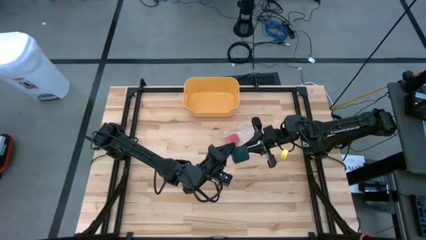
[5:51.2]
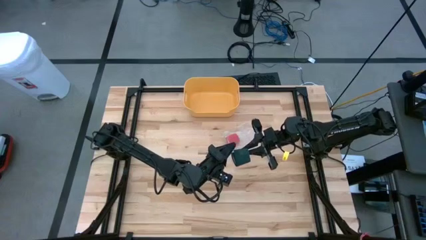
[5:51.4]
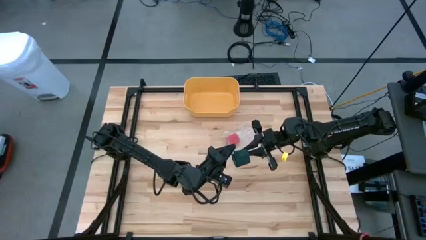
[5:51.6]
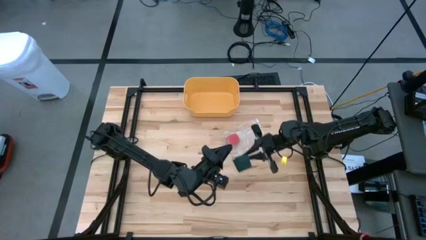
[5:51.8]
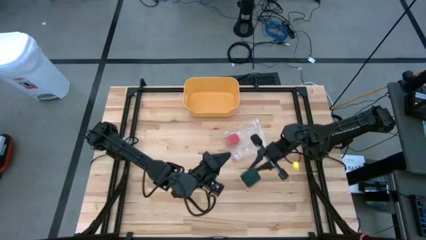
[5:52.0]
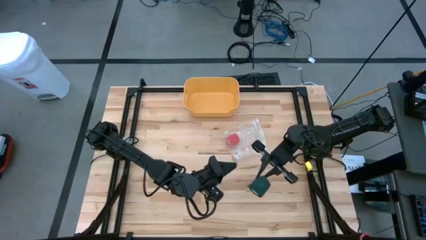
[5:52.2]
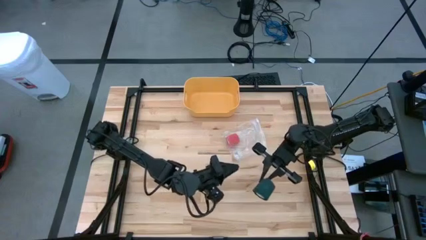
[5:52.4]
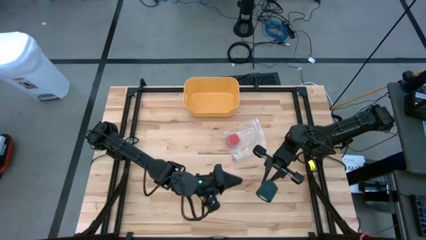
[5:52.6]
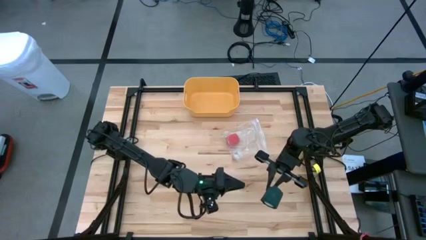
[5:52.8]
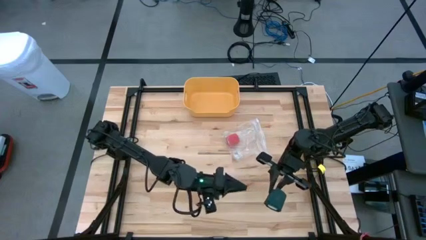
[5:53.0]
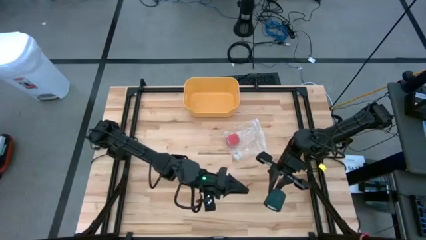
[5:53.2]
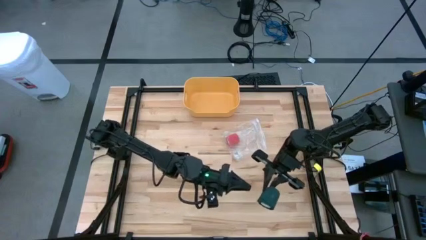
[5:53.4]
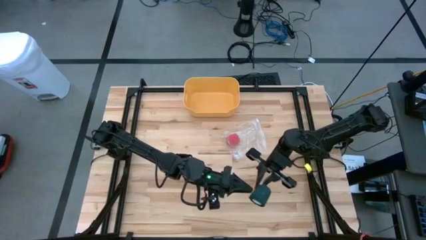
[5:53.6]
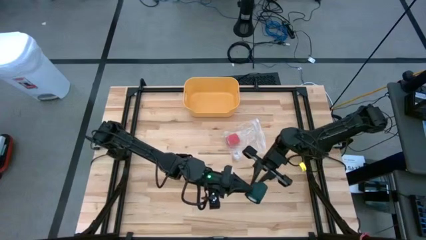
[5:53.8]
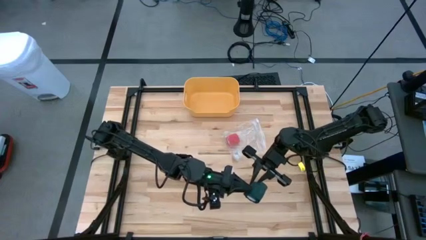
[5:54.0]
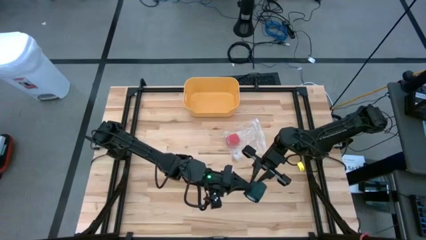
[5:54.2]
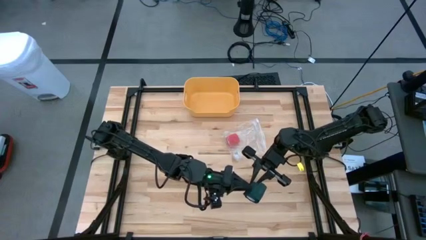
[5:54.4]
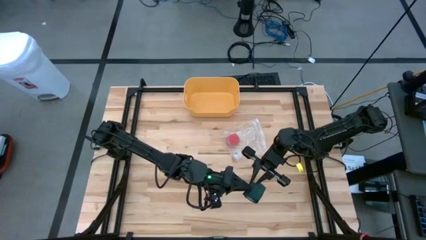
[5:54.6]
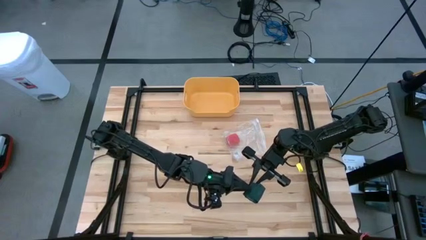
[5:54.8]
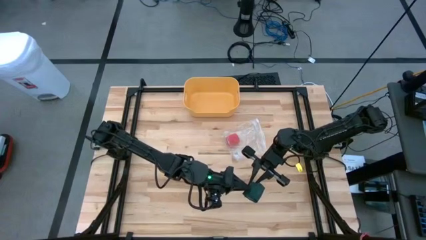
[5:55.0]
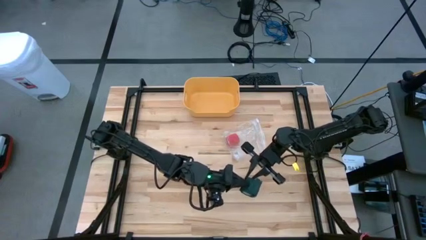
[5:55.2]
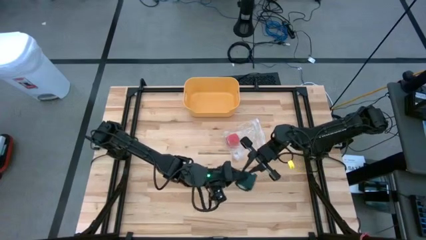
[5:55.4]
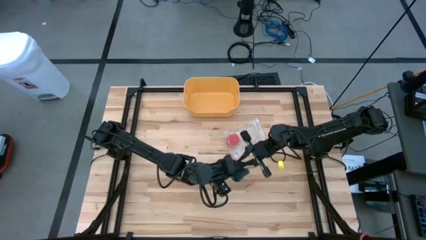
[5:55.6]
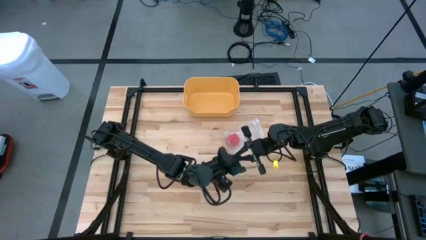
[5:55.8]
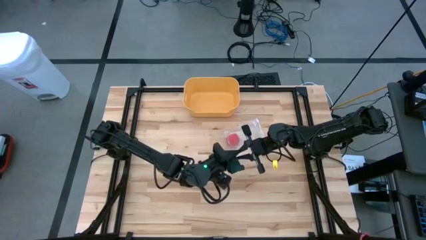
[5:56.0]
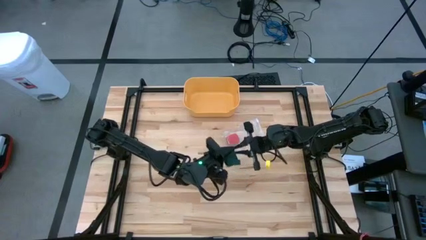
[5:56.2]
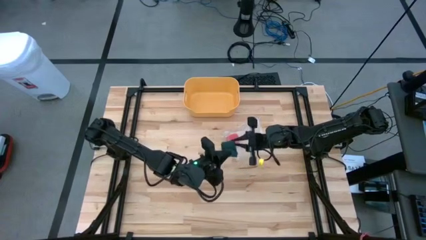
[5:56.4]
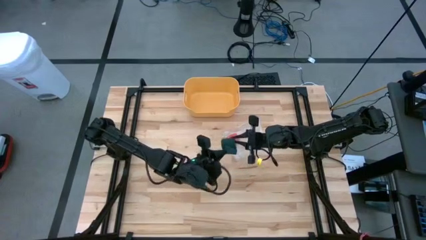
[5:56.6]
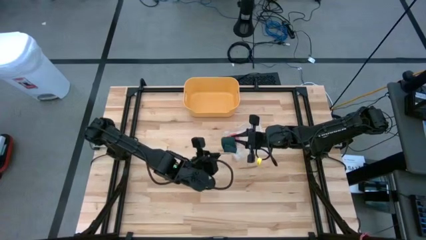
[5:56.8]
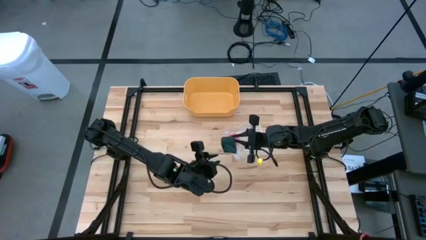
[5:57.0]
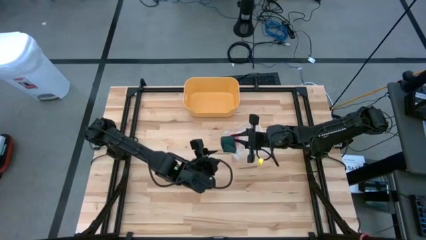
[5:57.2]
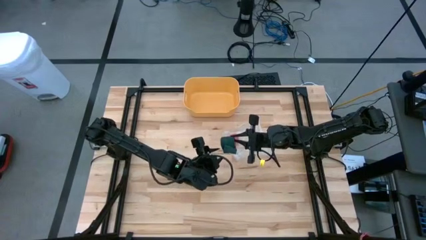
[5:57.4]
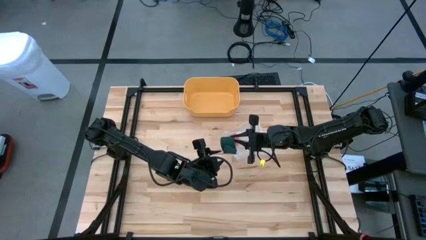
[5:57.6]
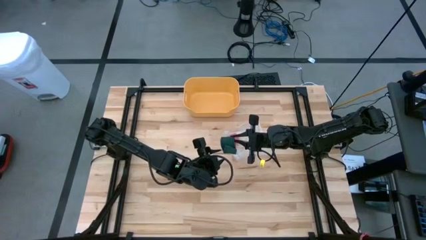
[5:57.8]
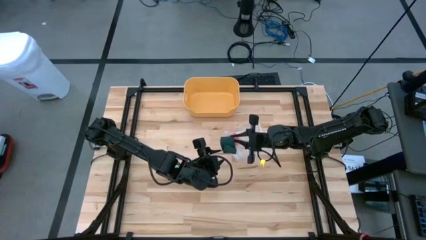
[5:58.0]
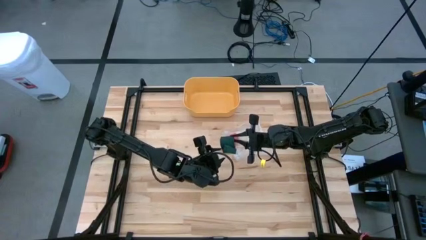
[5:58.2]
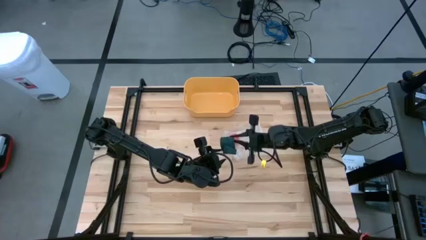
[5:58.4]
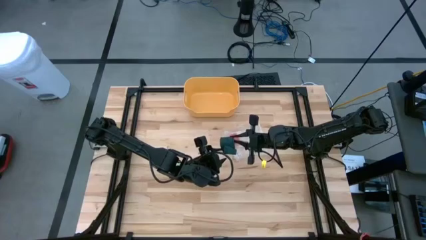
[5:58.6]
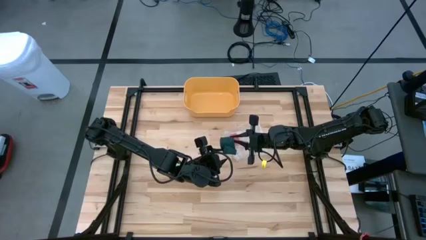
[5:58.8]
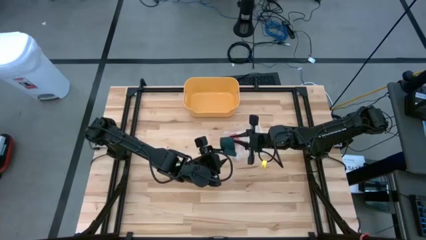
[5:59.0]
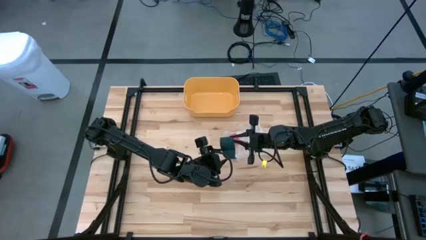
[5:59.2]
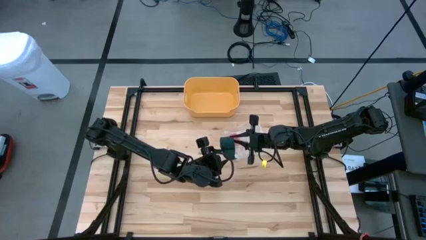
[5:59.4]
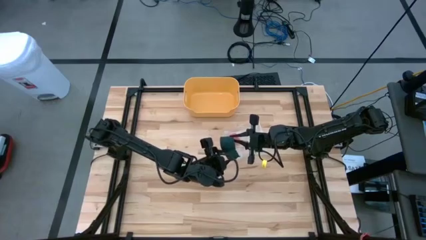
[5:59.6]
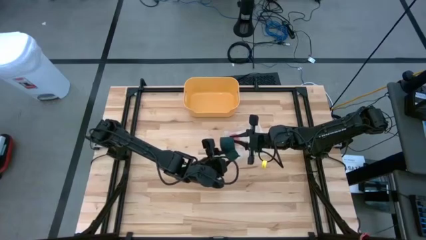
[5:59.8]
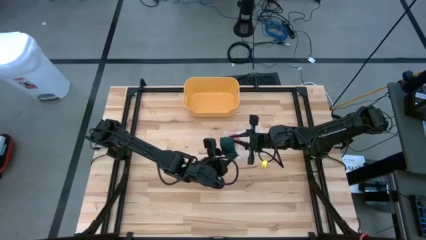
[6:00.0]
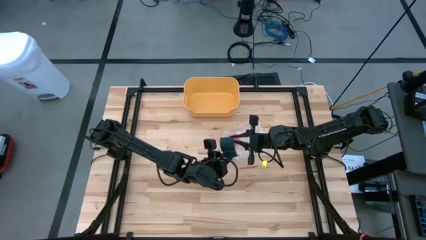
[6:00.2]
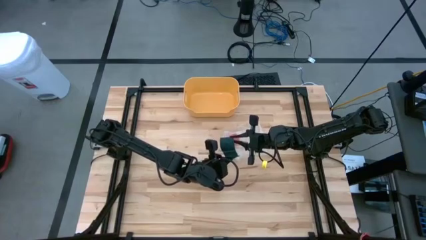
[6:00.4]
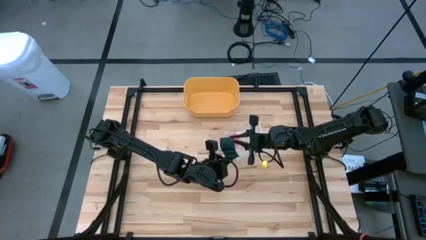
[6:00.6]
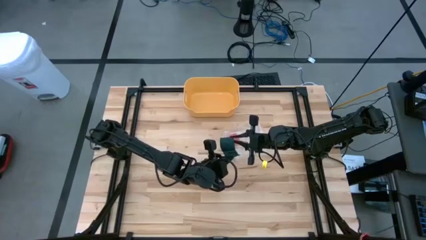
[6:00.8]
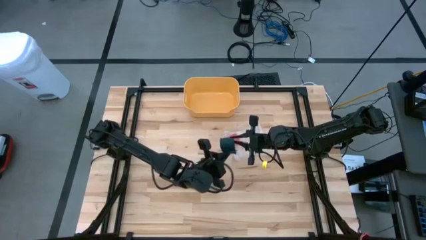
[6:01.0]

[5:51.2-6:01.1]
Task: Roll bandage
Roll the green bandage

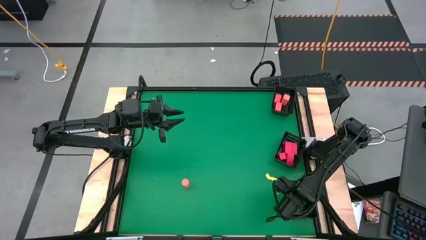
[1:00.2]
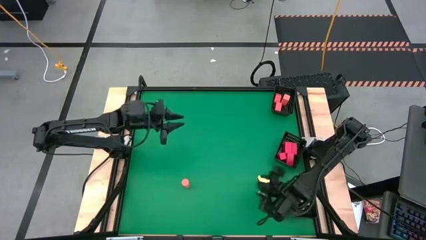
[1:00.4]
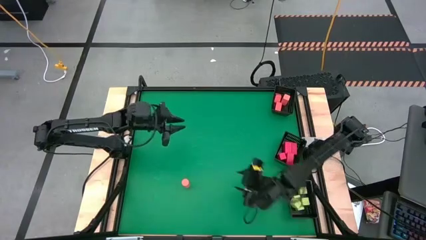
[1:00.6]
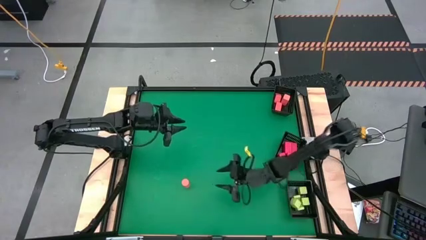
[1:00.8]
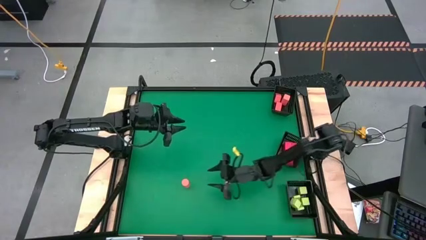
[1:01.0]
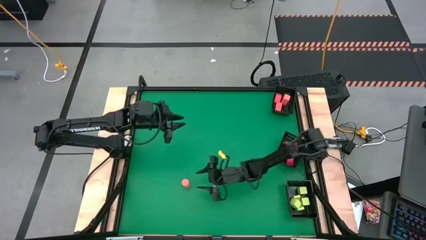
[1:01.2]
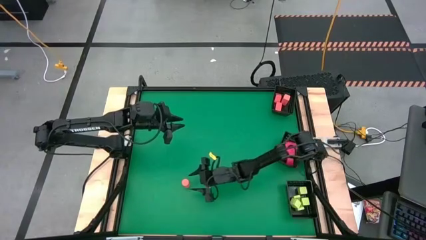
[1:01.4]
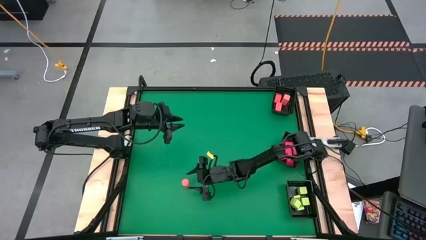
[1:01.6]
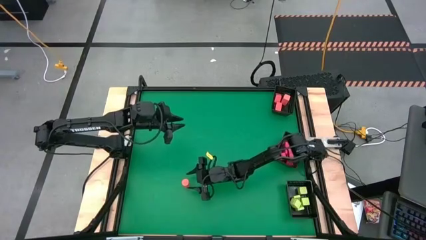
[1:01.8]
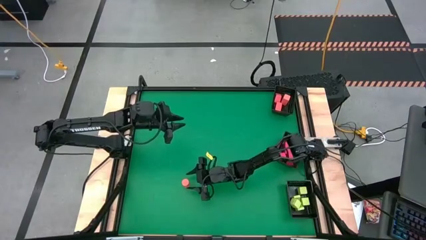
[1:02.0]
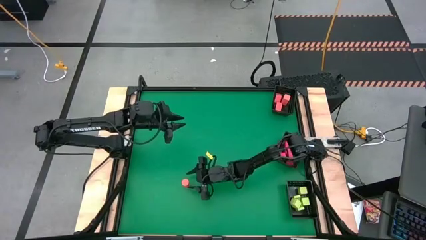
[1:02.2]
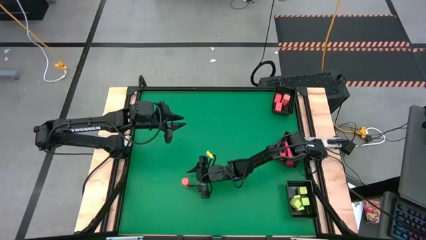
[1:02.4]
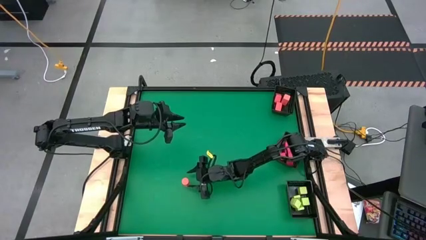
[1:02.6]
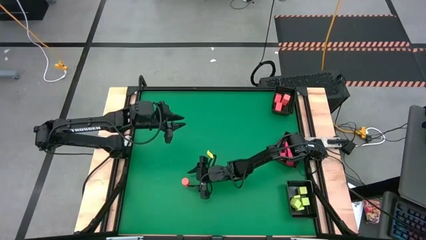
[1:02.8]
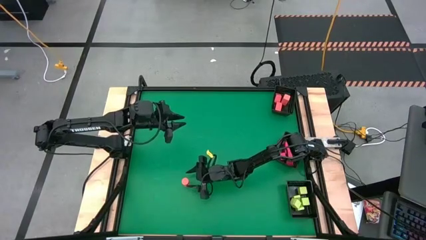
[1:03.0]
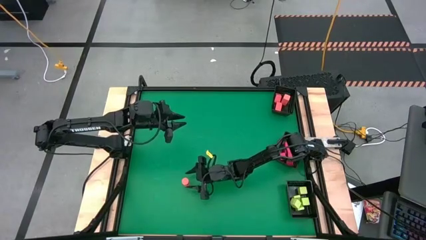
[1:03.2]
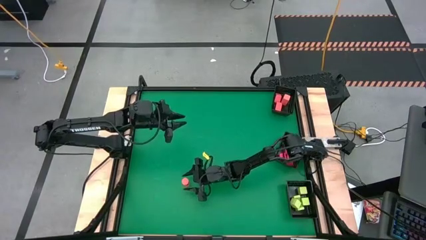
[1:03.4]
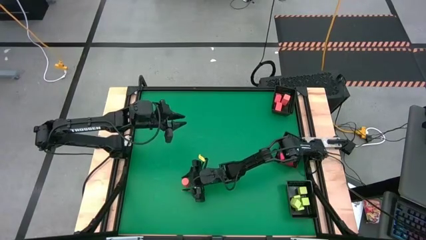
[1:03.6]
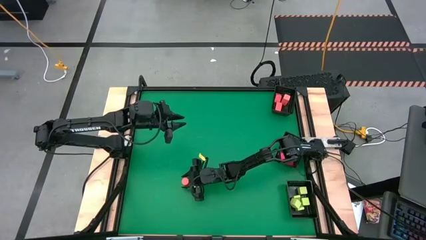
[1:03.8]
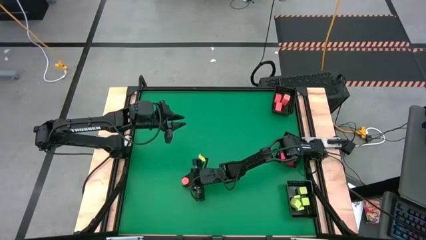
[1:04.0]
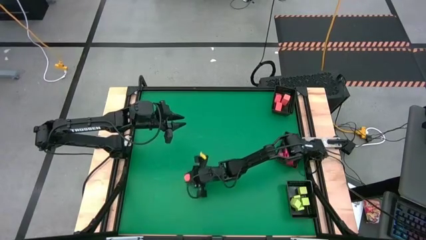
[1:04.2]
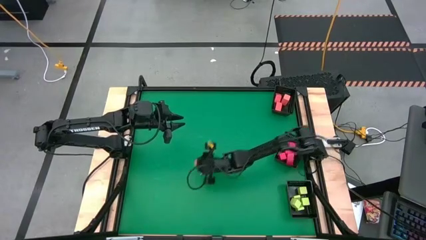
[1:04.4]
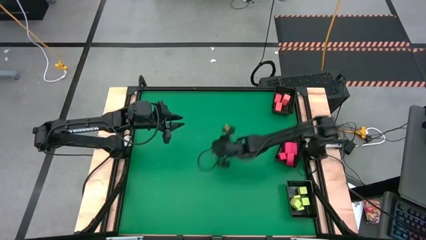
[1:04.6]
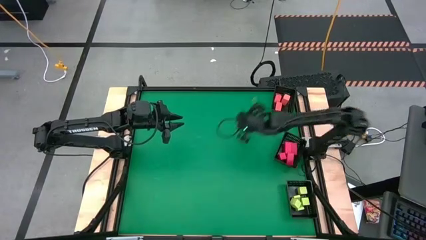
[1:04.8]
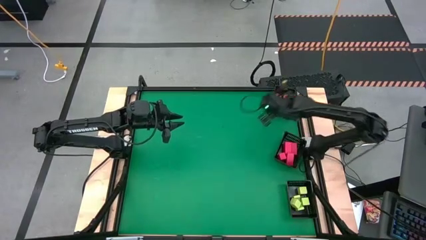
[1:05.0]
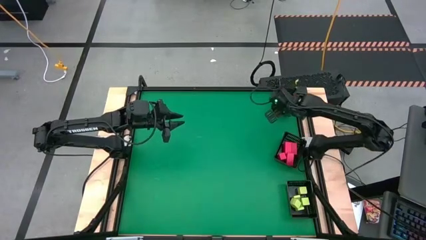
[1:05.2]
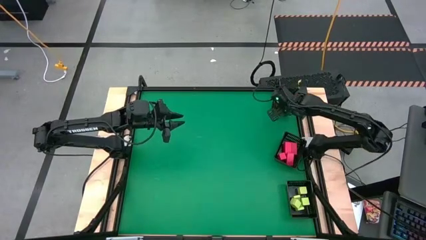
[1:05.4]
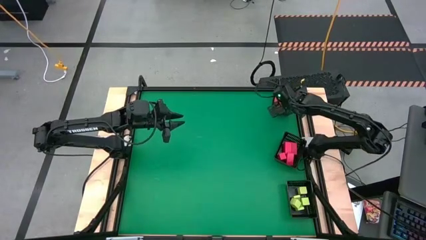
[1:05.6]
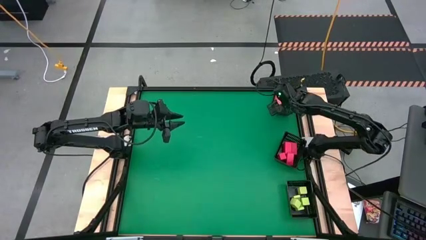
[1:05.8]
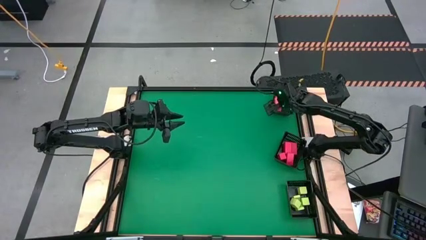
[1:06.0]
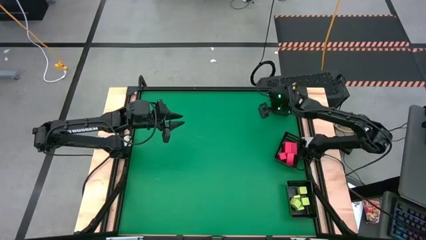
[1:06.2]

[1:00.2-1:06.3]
Task: Sort & place blocks by color
Put the orange block into the top right black bin
